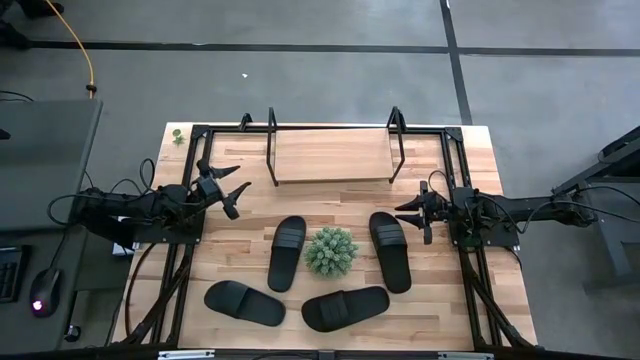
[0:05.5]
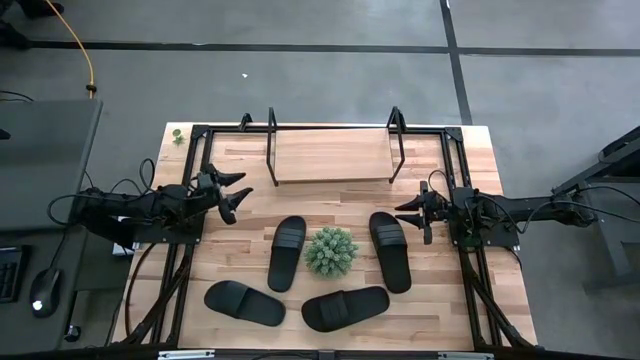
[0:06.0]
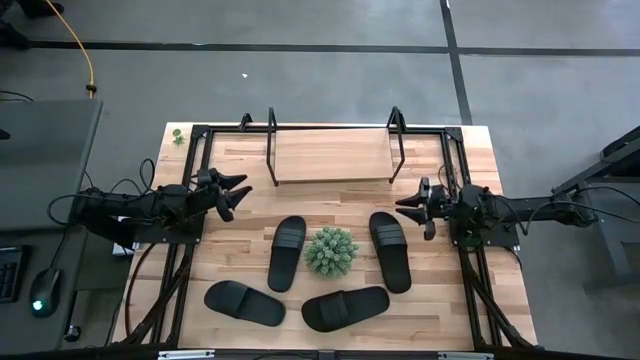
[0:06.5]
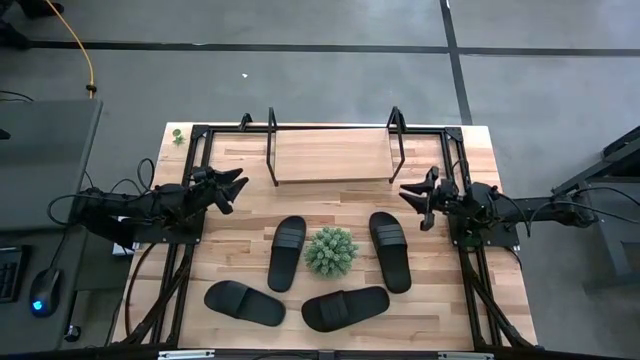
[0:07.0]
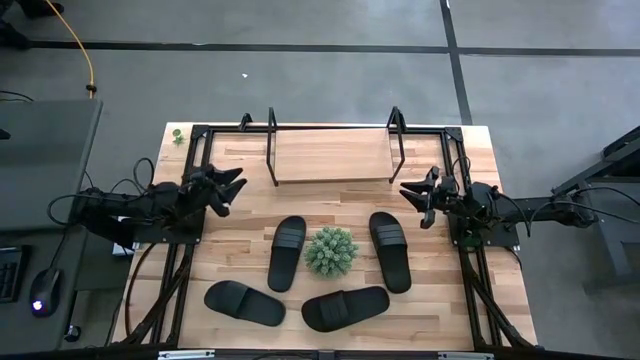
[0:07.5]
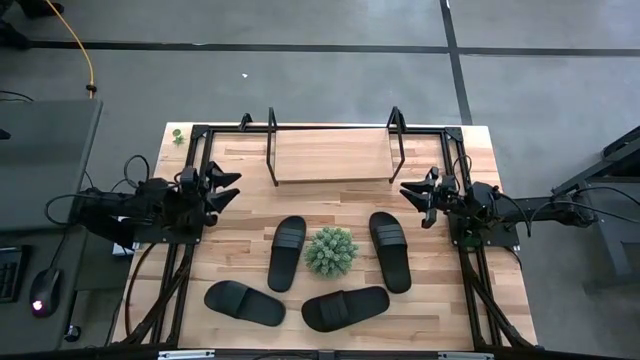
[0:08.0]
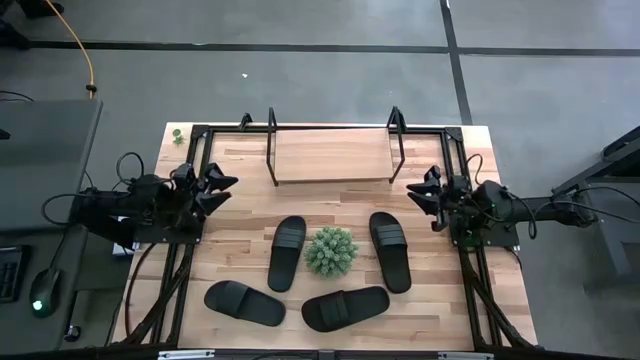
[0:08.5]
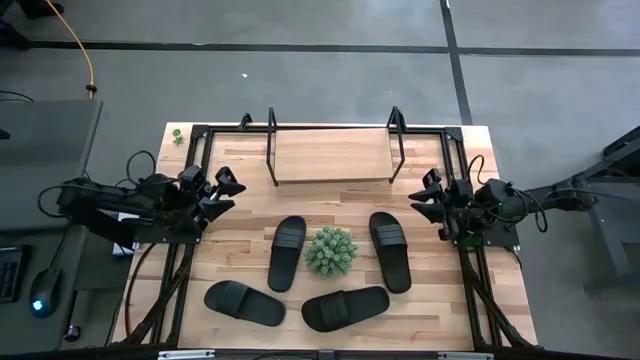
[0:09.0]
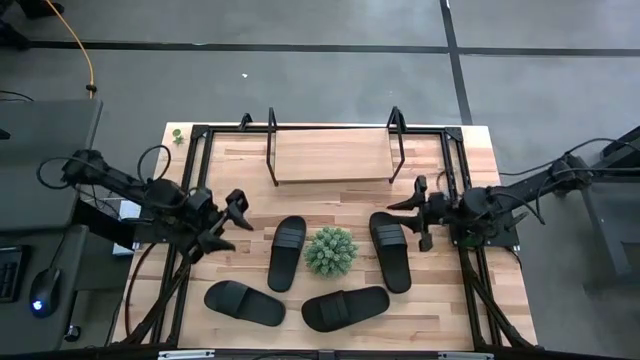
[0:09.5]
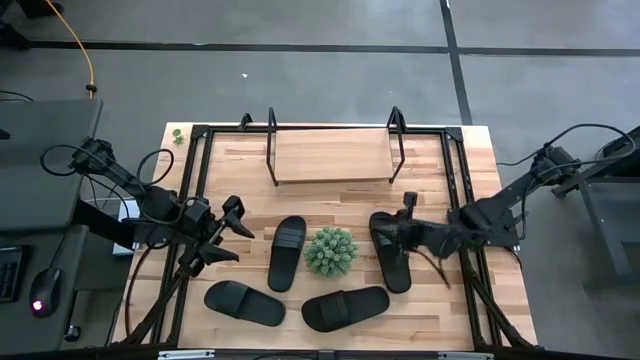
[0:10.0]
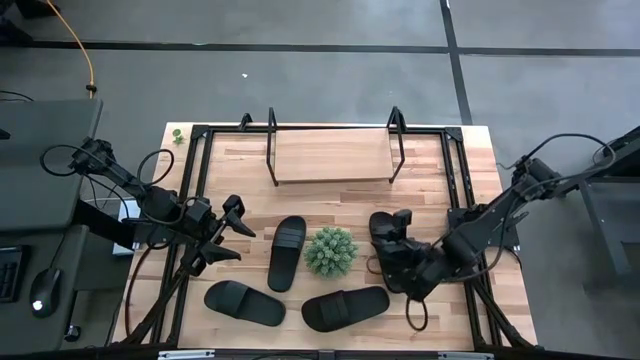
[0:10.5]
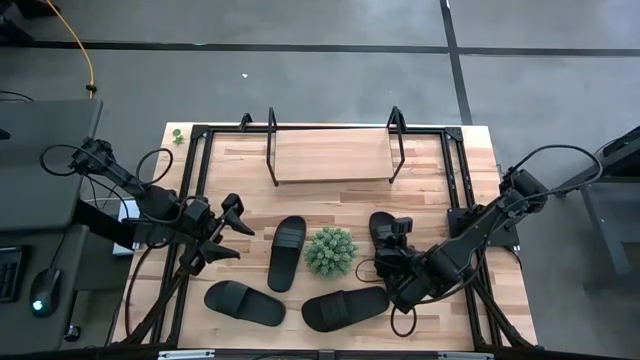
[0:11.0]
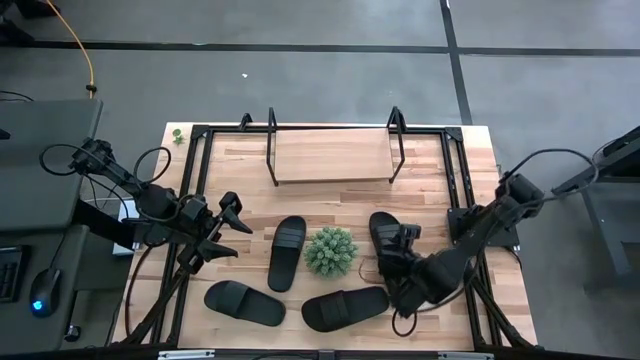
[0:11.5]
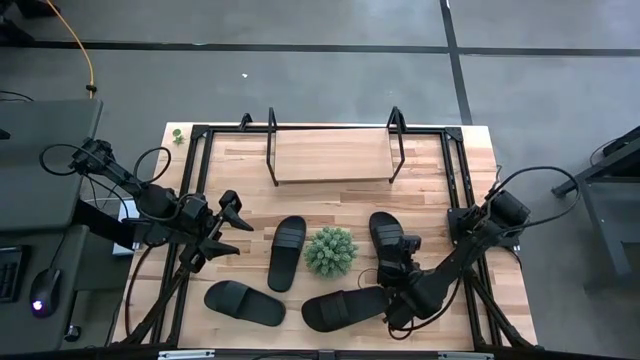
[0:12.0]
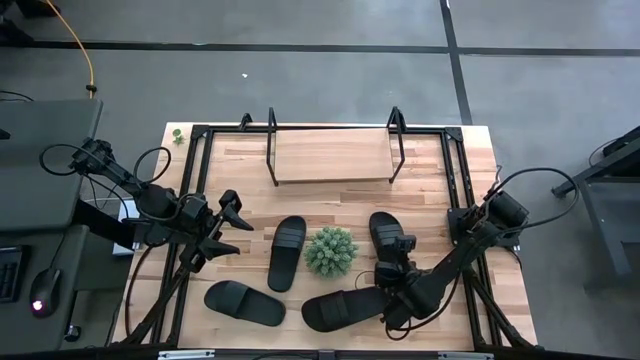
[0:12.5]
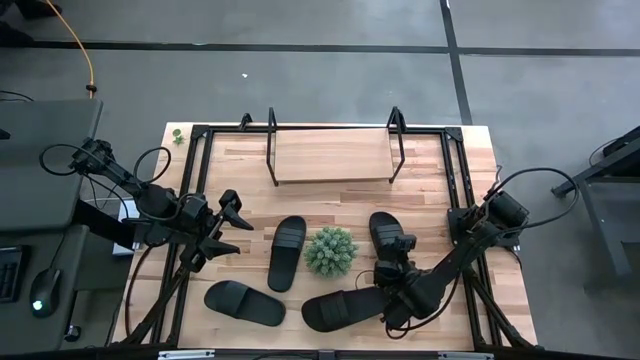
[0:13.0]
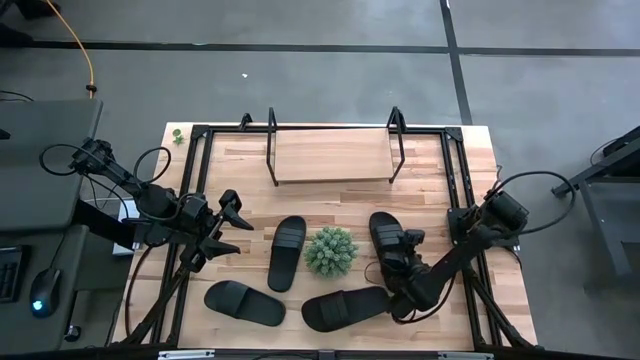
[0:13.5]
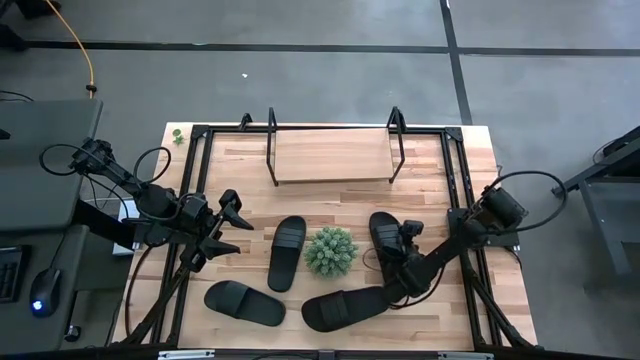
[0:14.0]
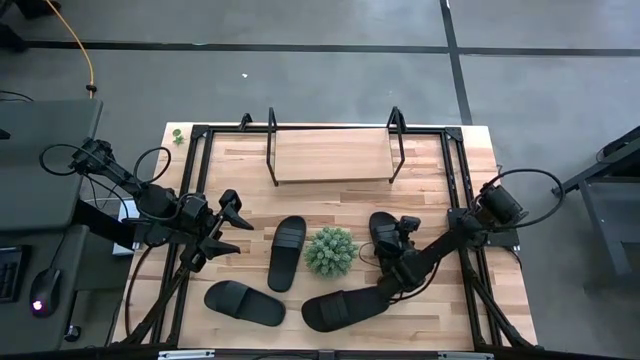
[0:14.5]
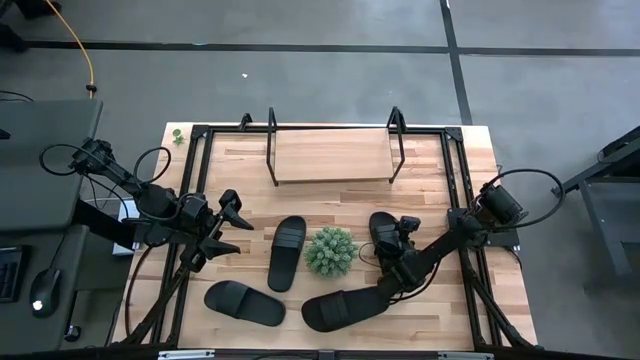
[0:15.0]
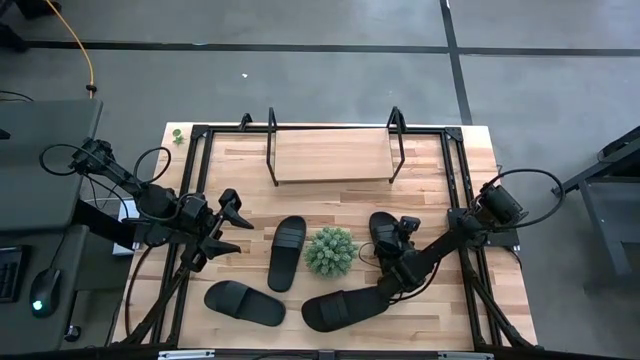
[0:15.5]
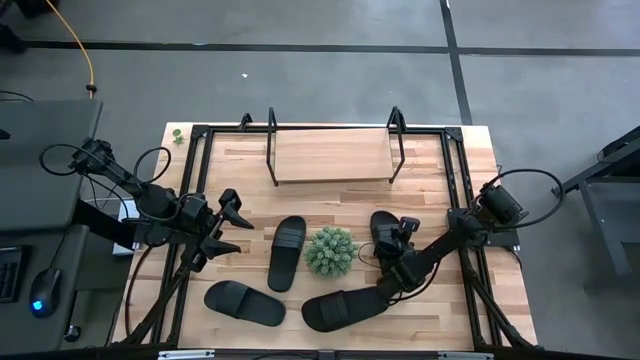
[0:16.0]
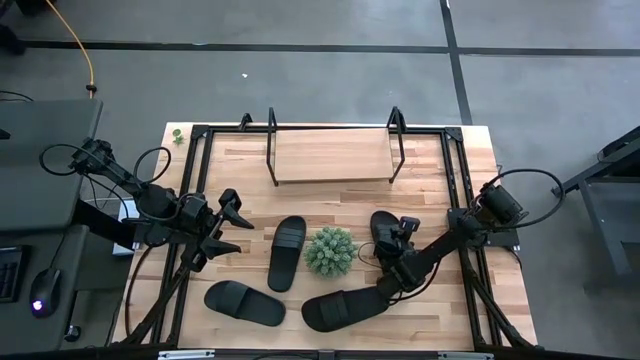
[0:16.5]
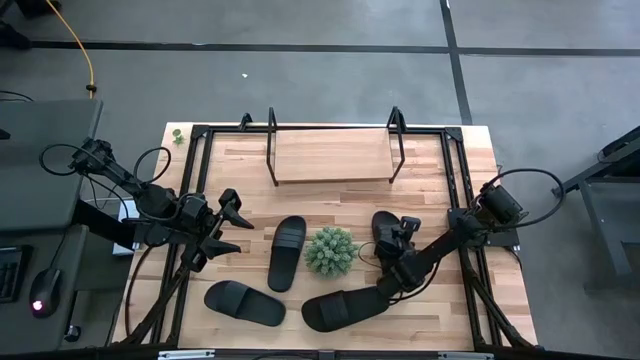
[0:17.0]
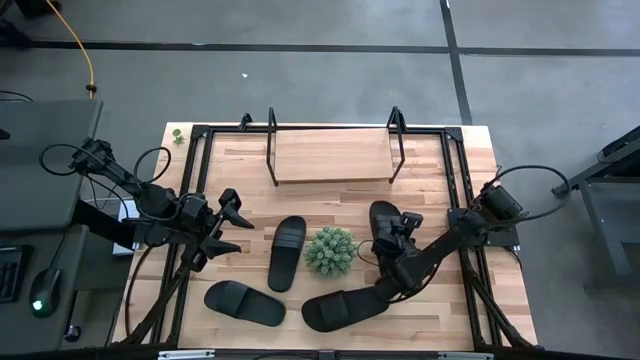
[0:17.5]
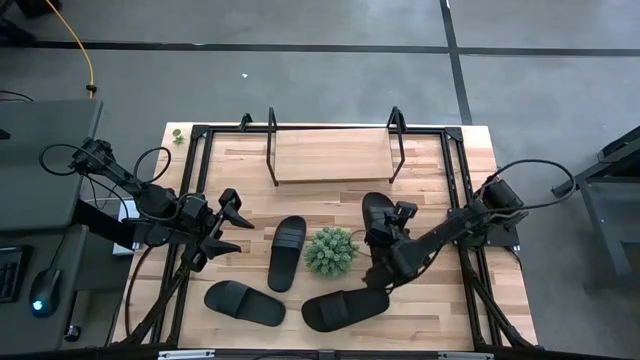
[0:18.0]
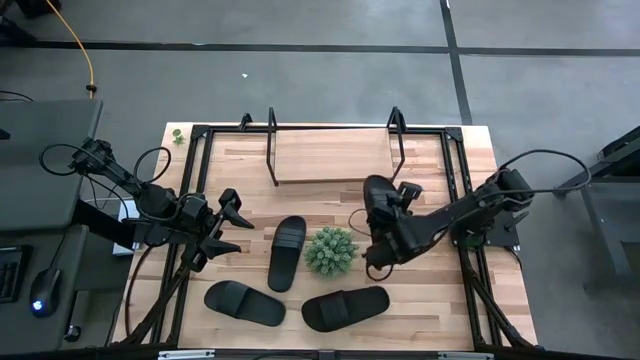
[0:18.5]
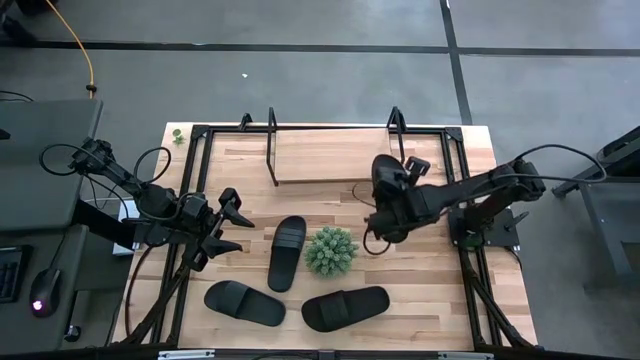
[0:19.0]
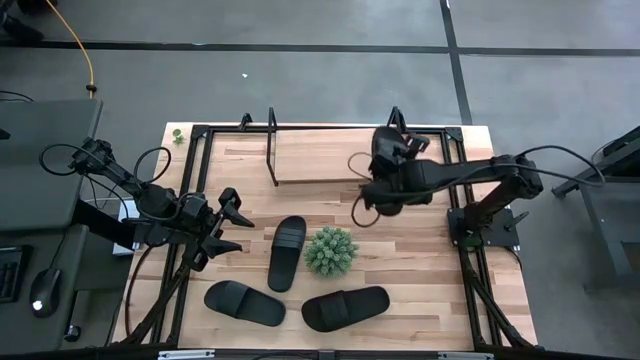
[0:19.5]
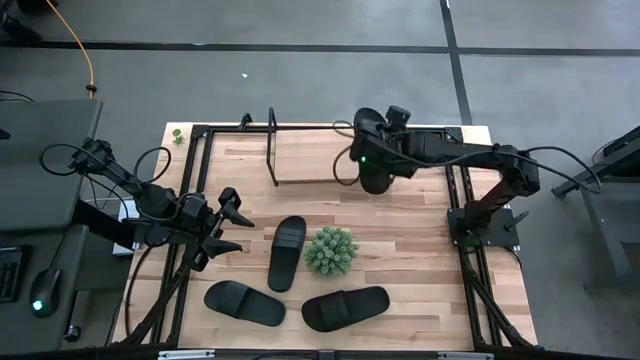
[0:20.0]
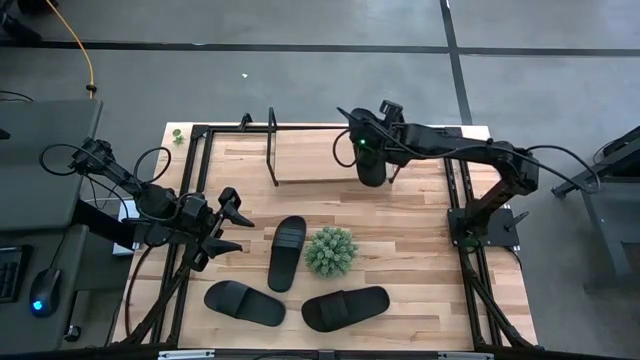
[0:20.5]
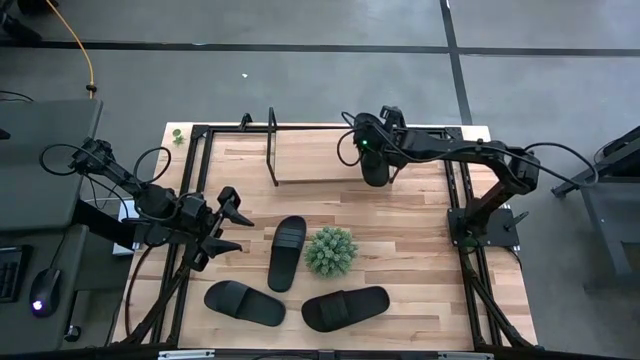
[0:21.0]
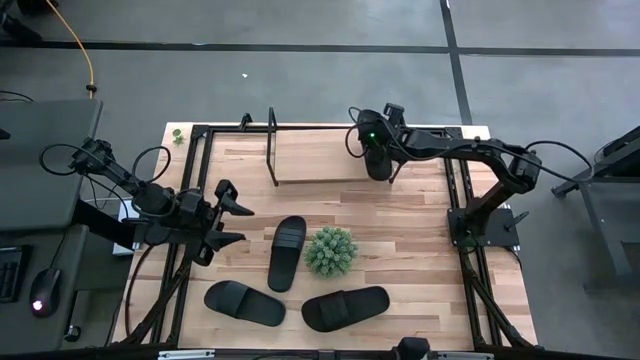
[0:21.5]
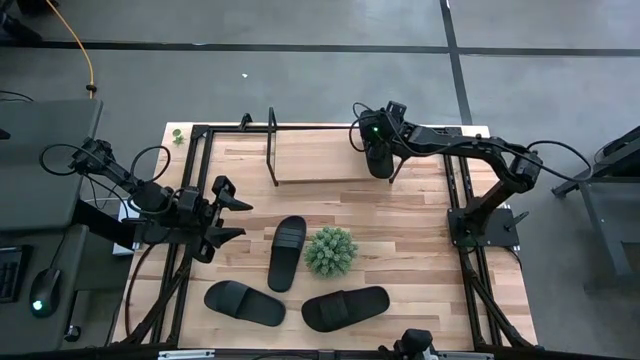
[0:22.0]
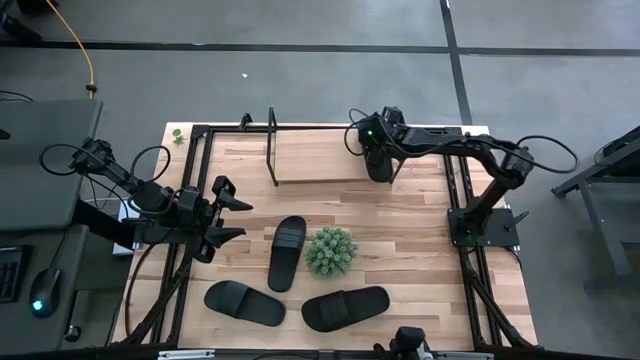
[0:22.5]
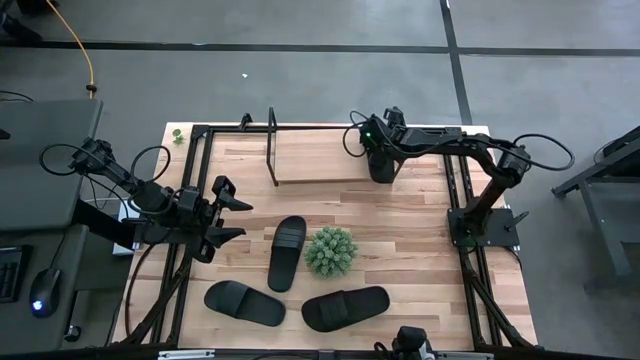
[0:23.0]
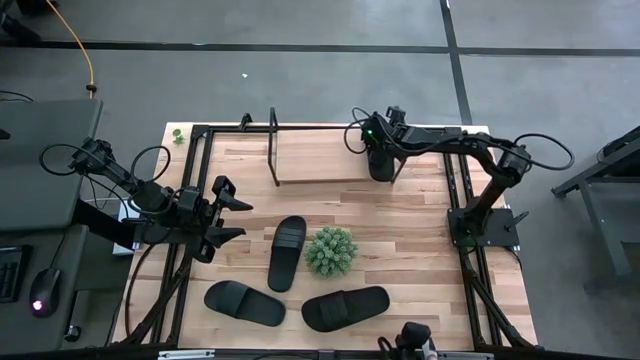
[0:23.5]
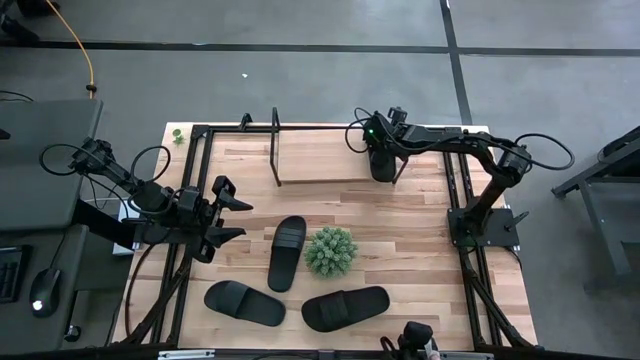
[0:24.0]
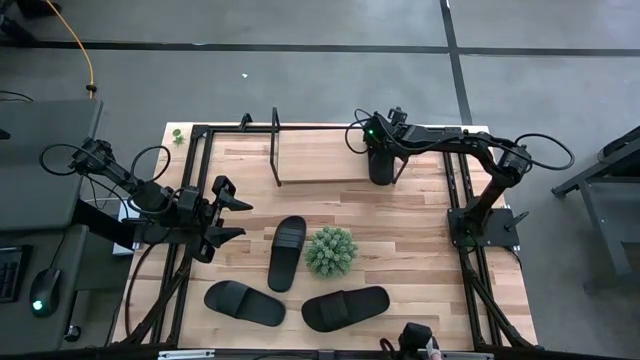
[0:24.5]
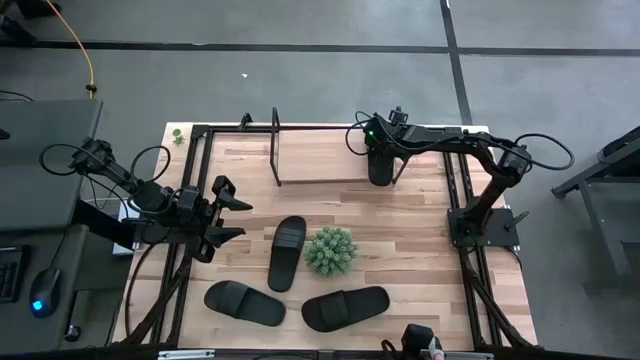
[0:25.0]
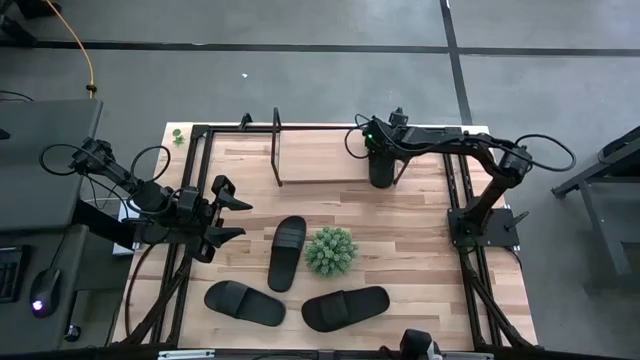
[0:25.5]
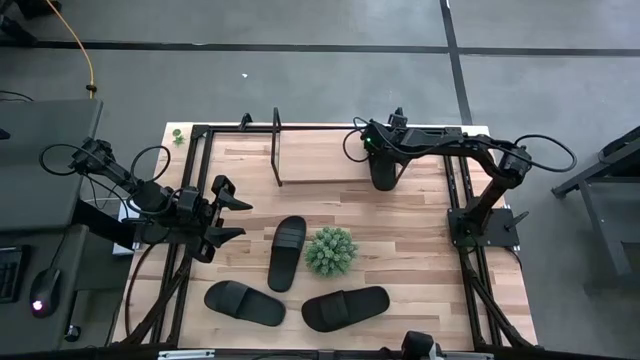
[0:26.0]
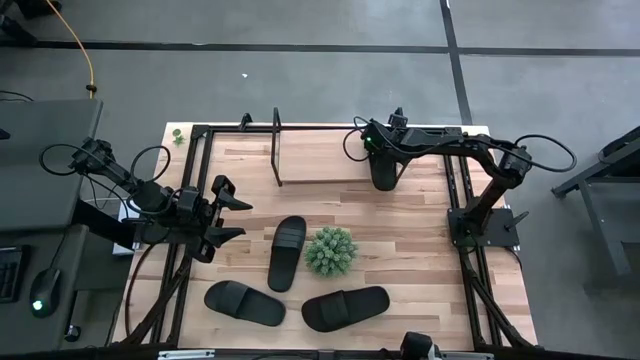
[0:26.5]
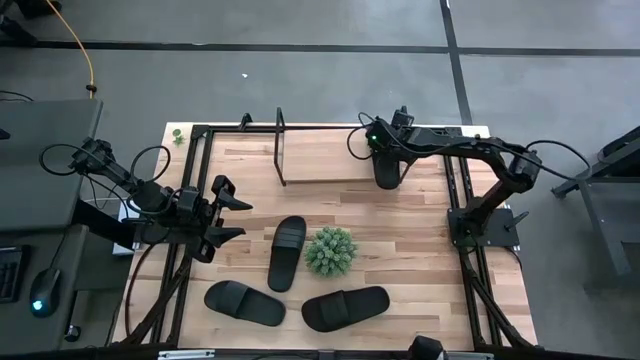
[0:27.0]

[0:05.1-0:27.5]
Task: Pick and place slides into the shelf
Put the right black slide on the shelf
